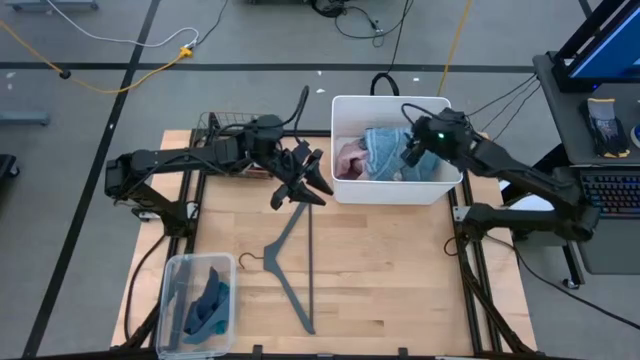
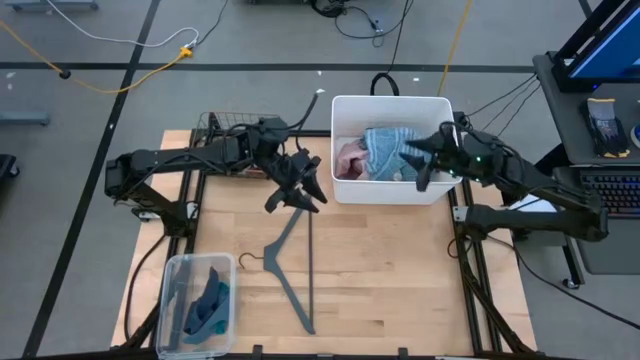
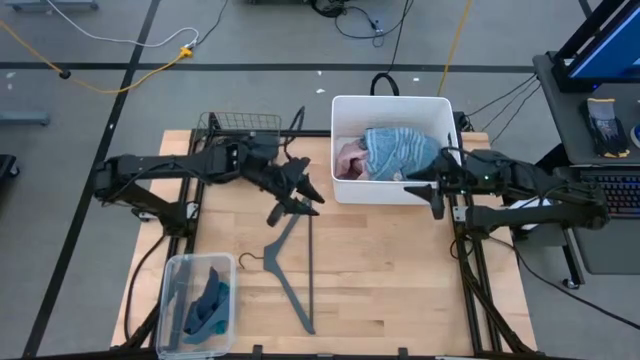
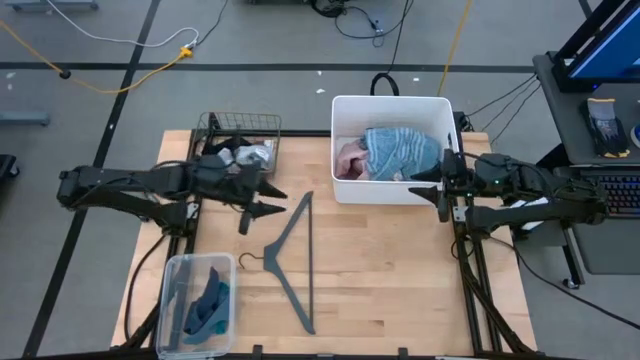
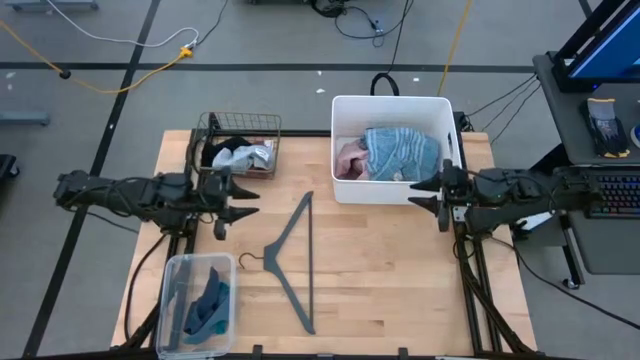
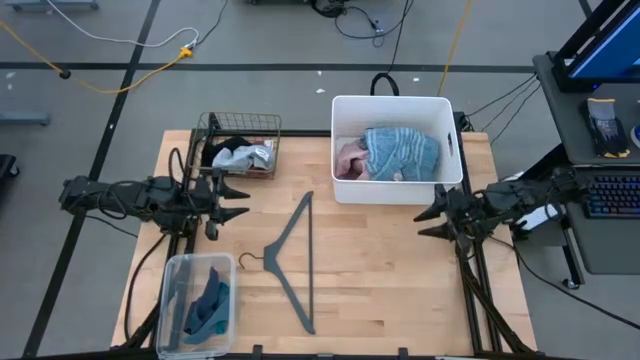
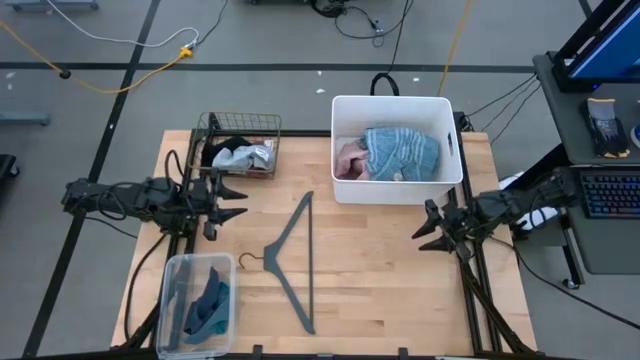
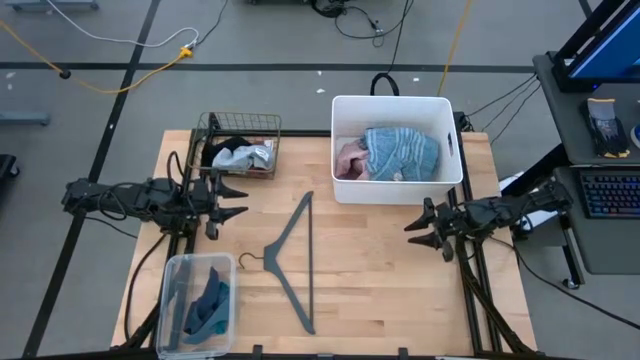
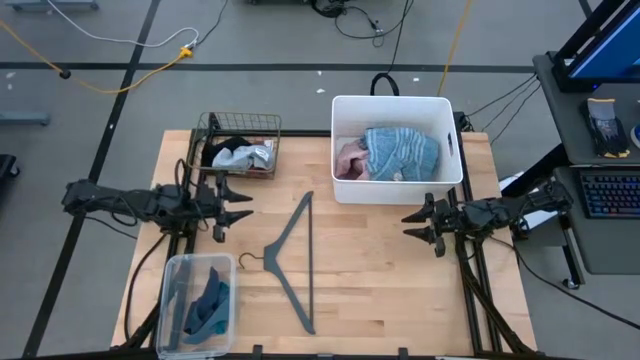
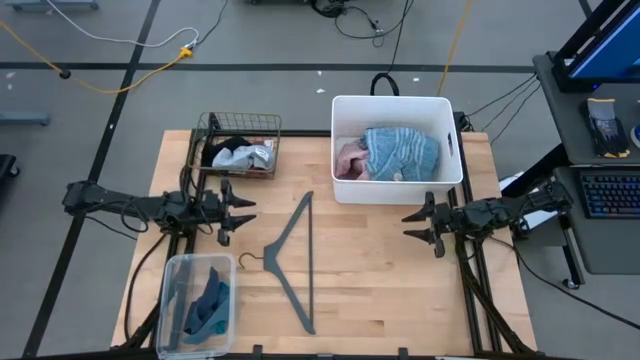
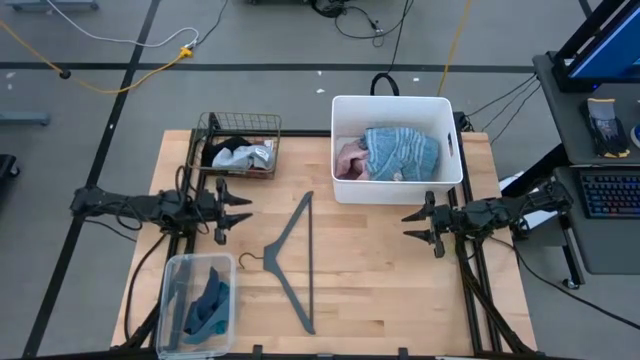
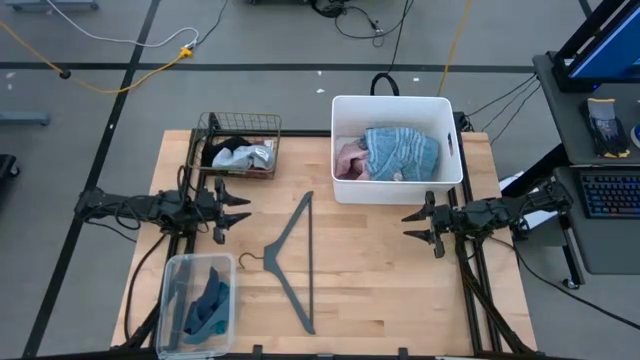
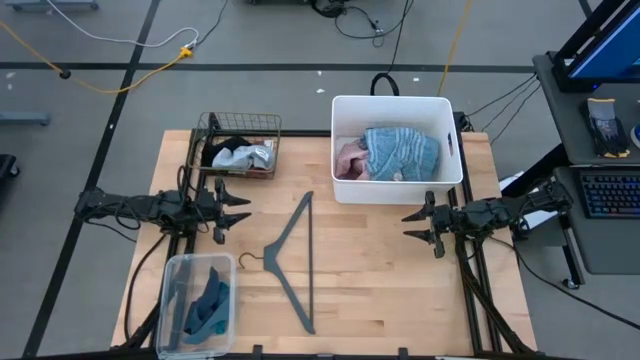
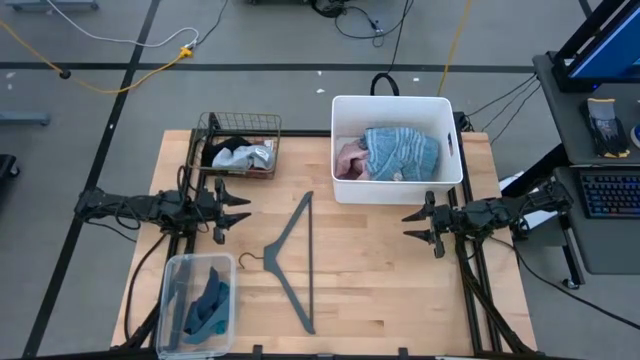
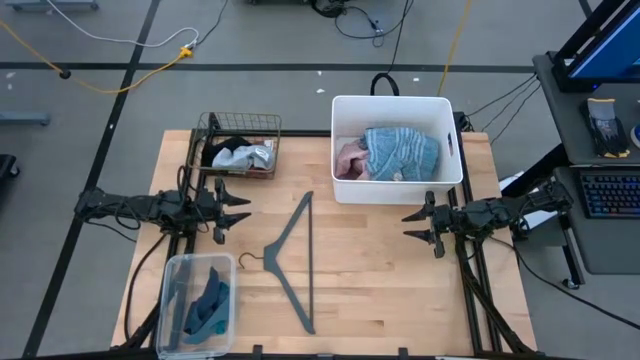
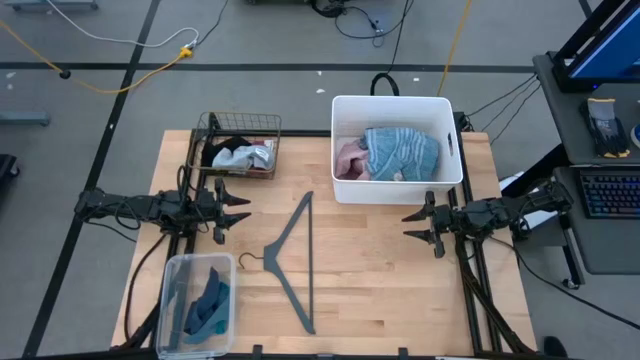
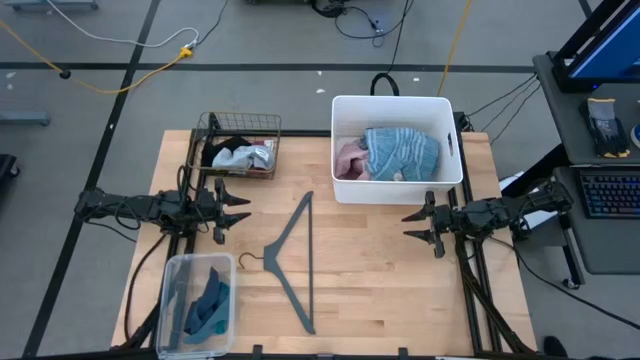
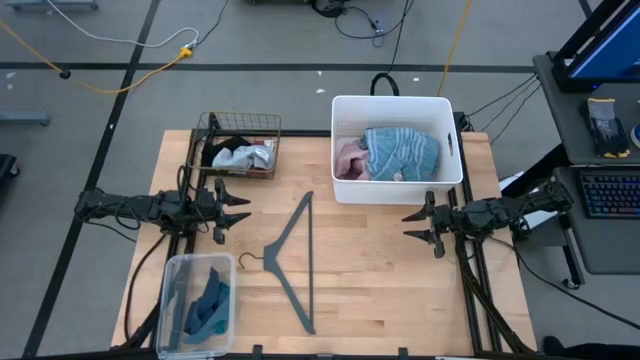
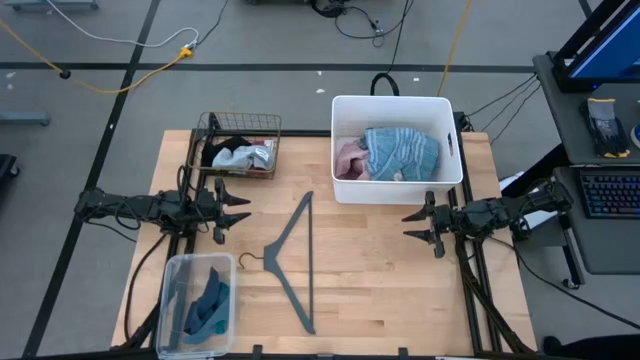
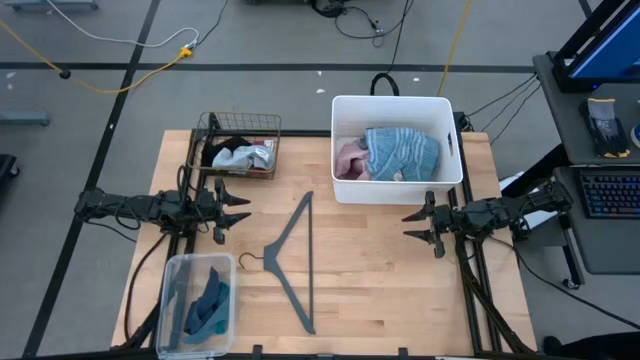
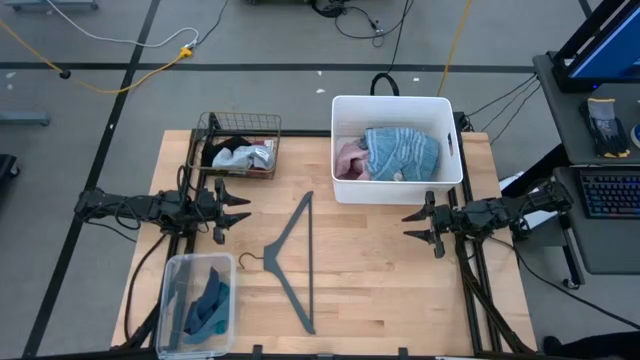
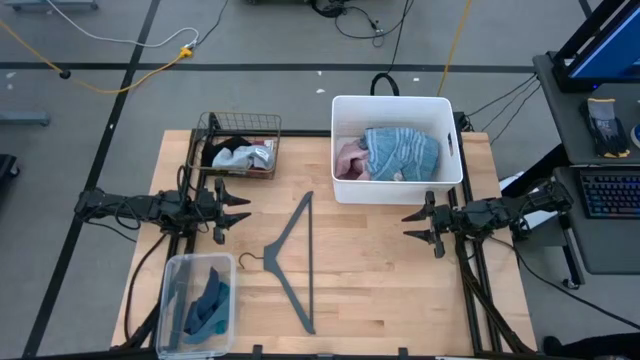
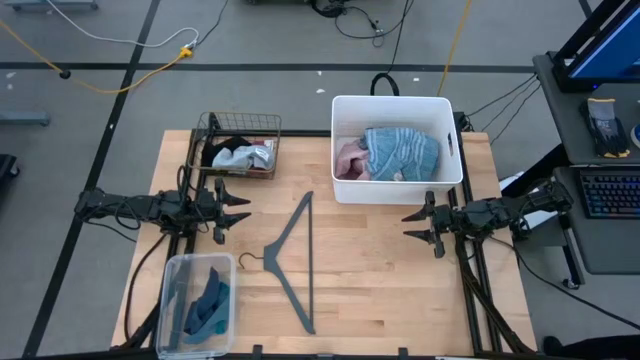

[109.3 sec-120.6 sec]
Task: Pick & Place Cloths
Return to Home Position

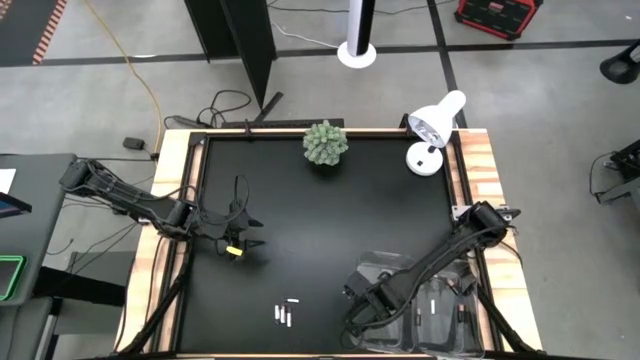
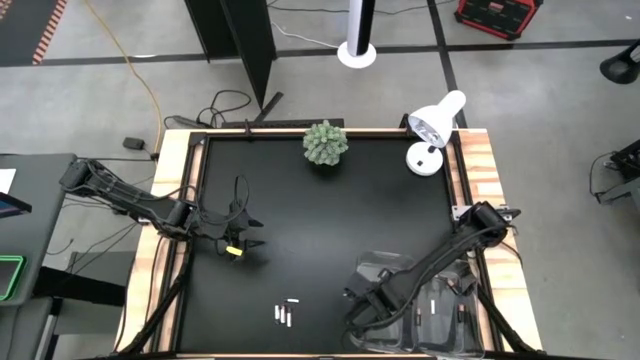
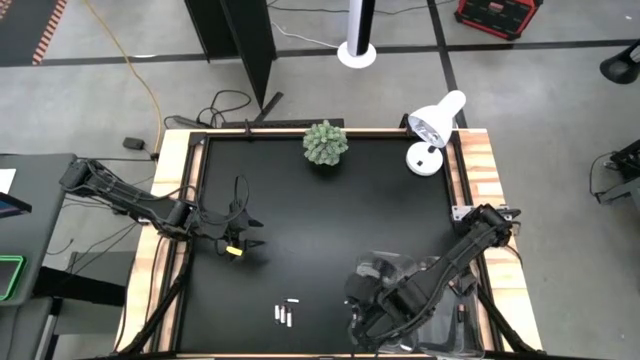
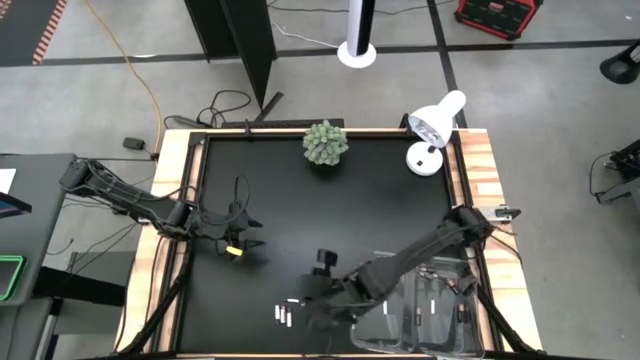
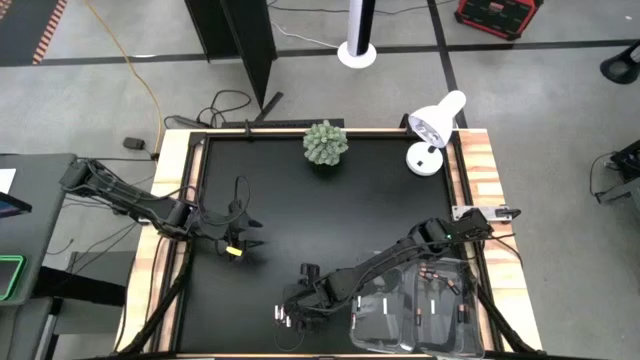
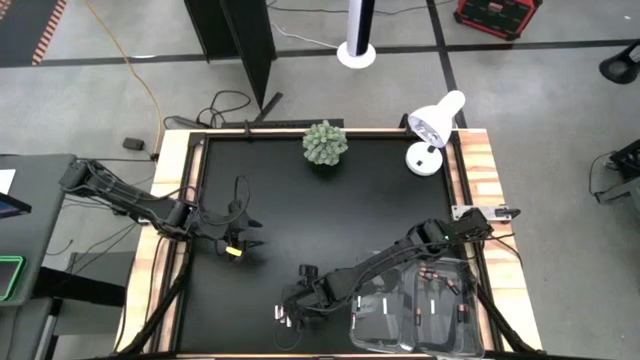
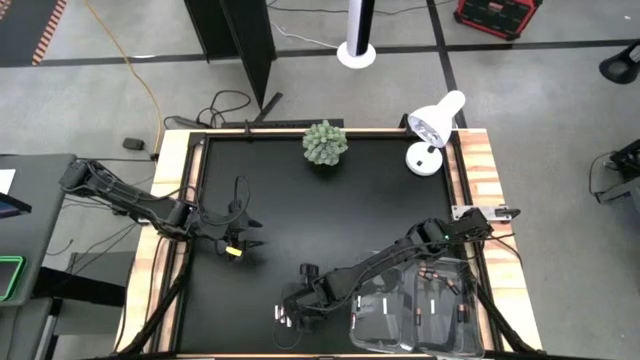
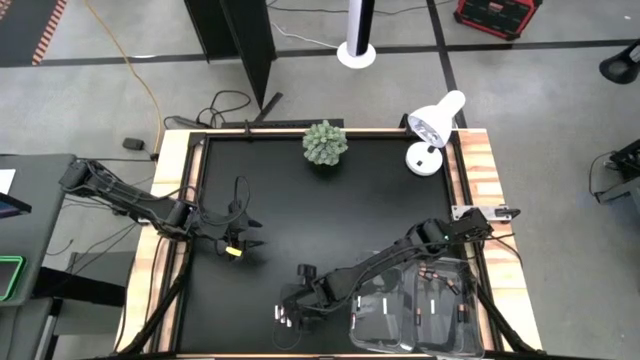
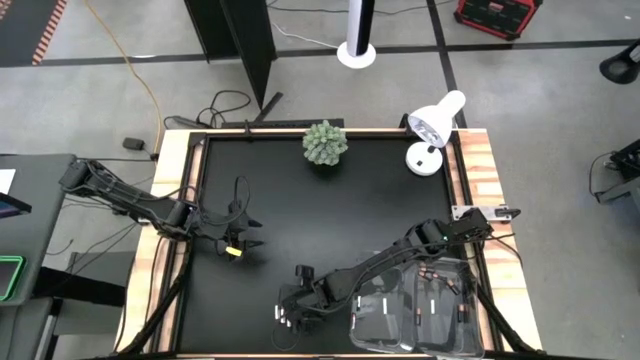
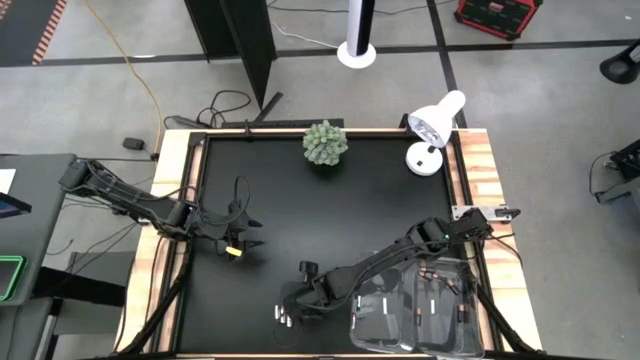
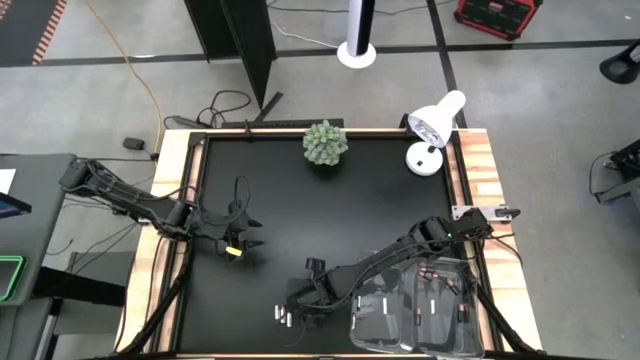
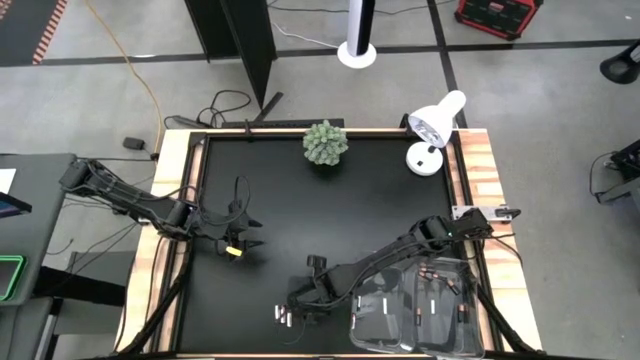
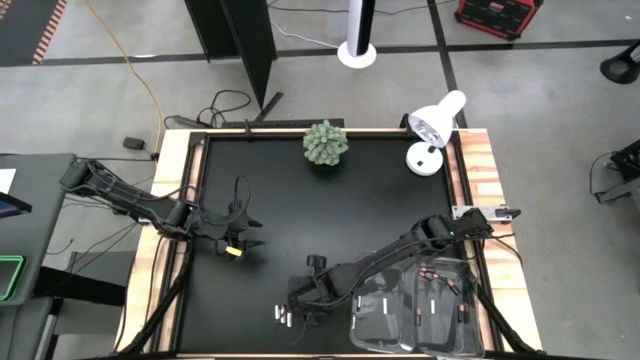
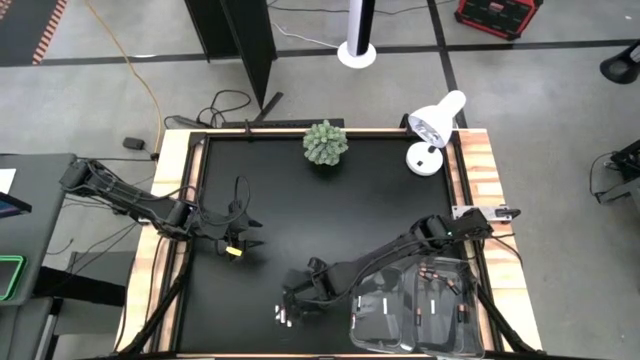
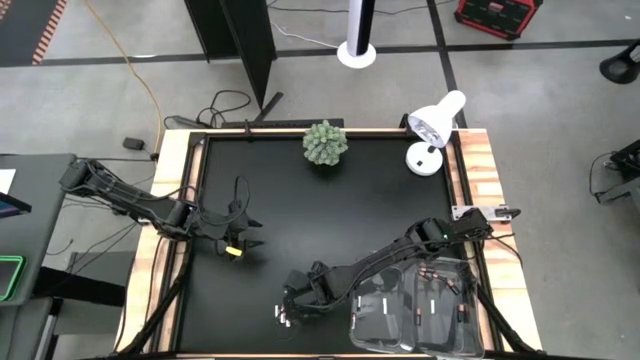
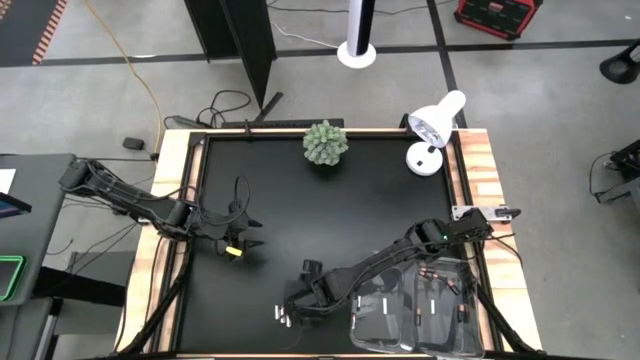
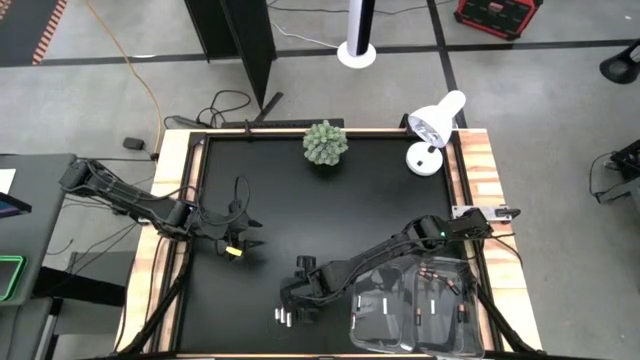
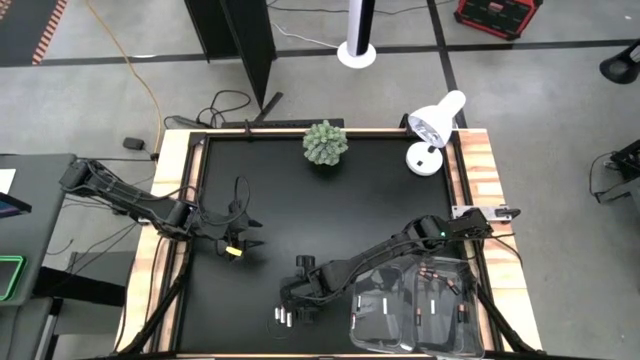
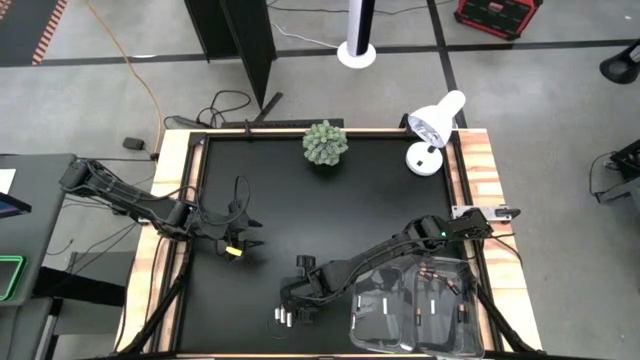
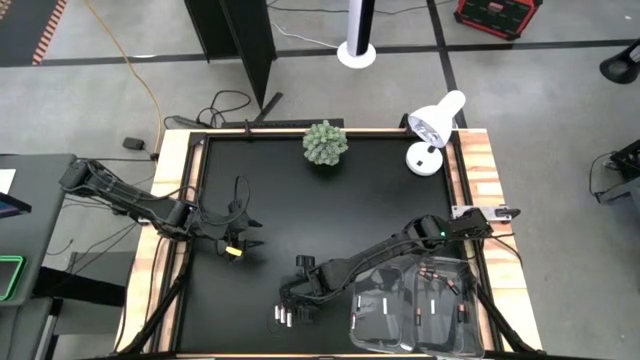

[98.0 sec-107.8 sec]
Task: Sort batteries
Put the silver battery into the left transparent bin
